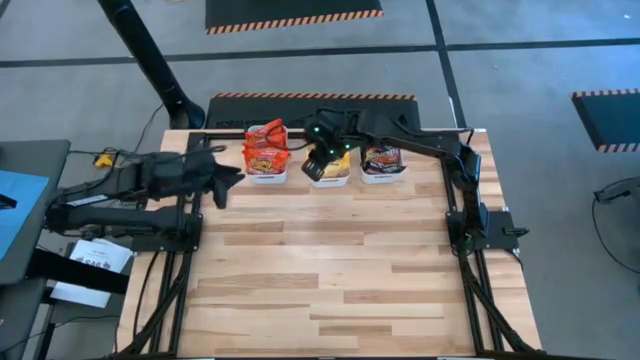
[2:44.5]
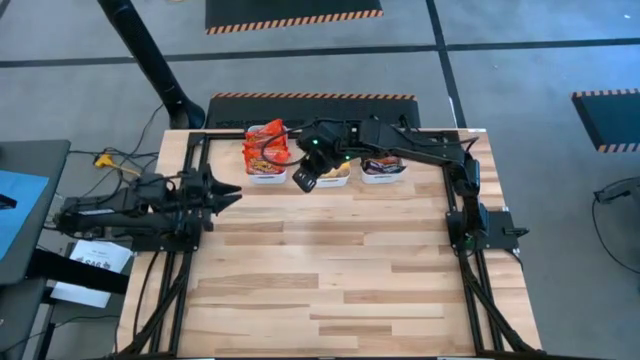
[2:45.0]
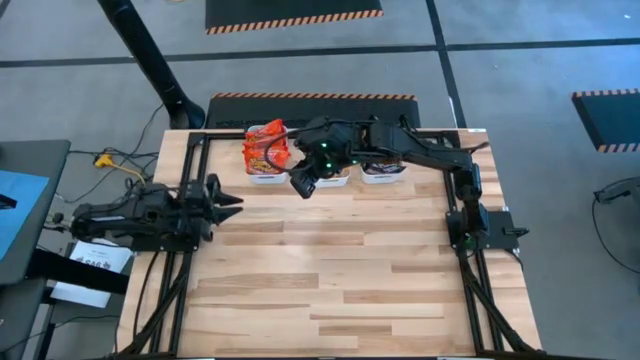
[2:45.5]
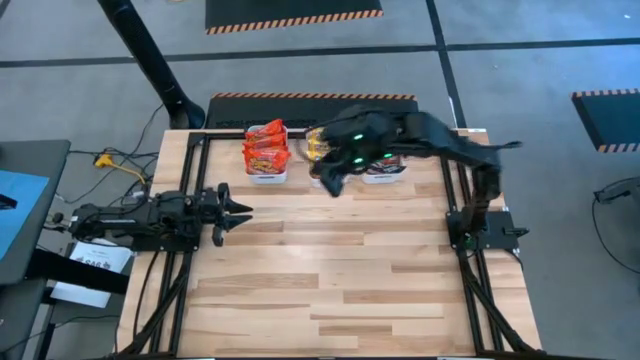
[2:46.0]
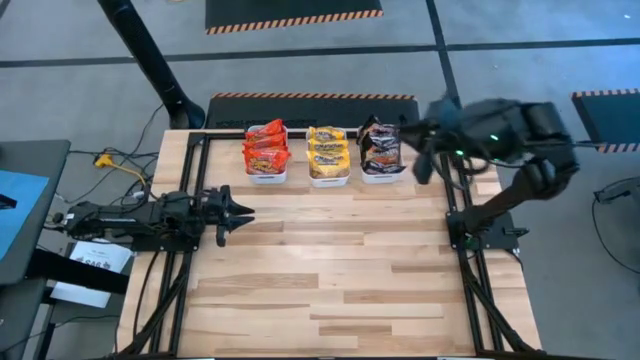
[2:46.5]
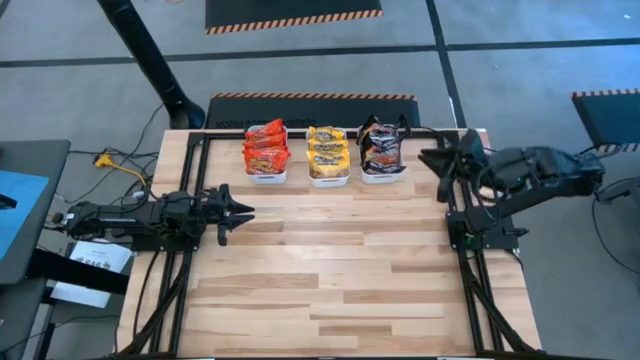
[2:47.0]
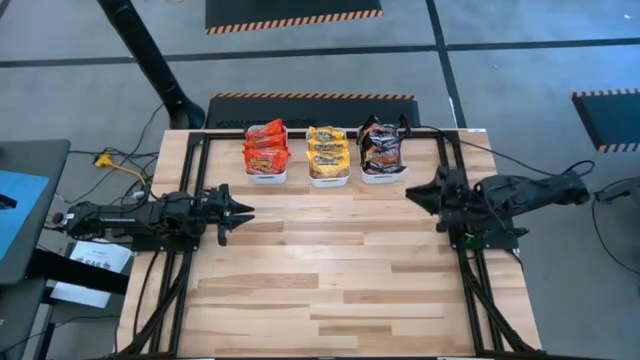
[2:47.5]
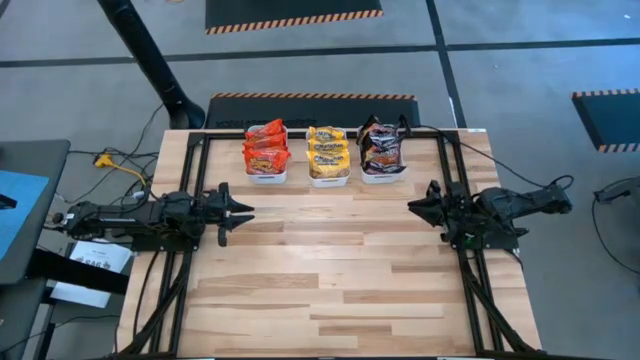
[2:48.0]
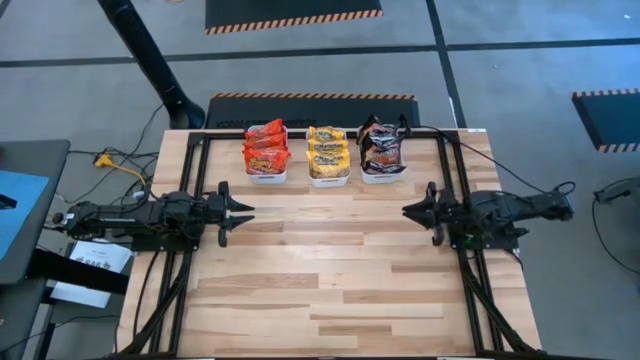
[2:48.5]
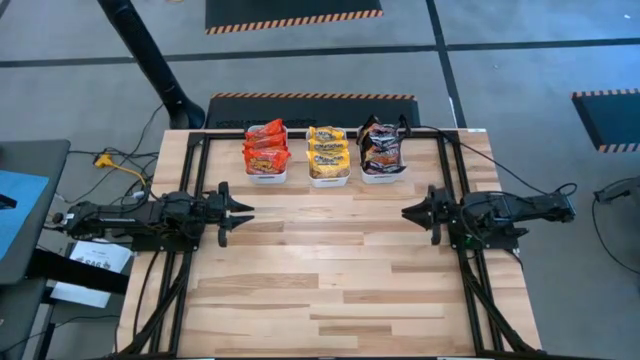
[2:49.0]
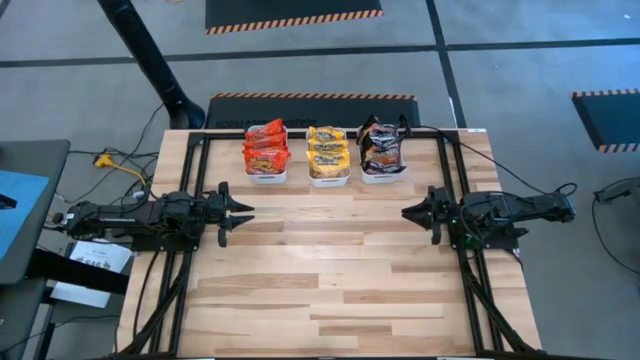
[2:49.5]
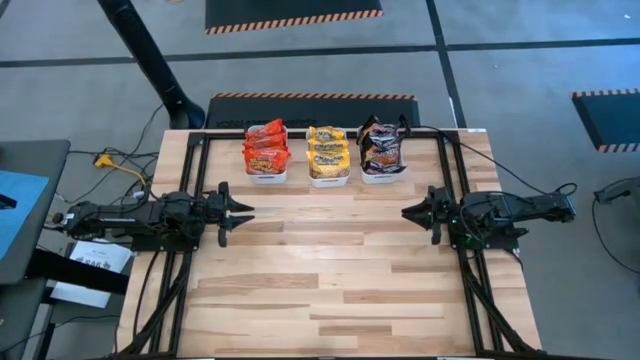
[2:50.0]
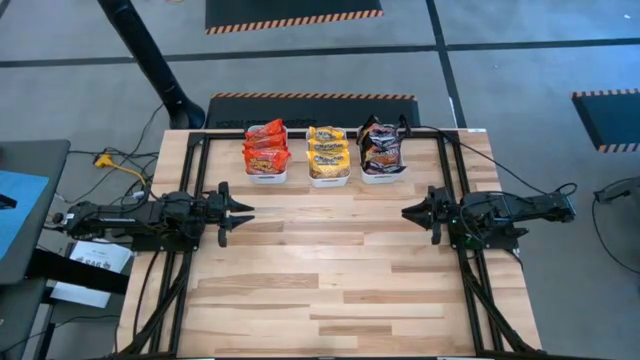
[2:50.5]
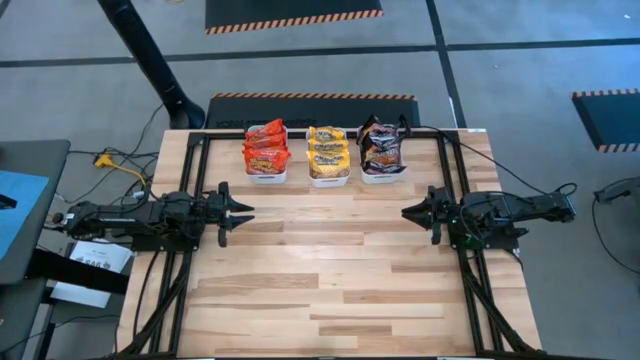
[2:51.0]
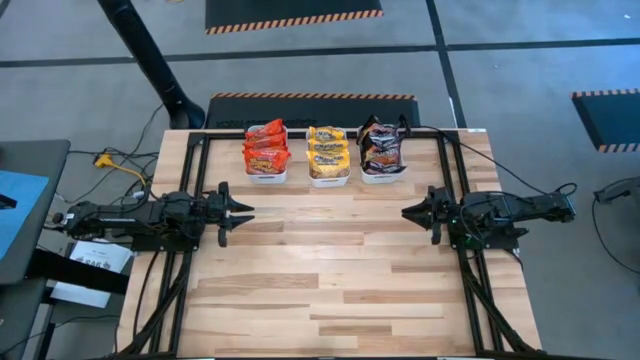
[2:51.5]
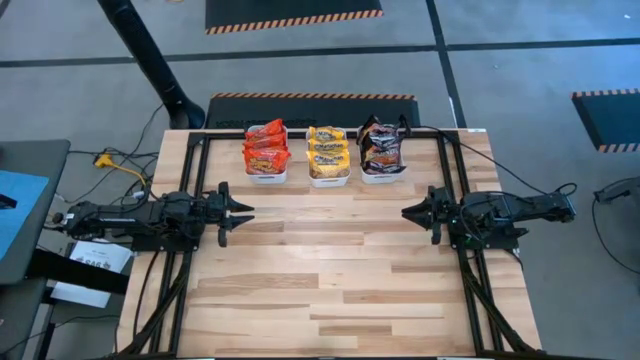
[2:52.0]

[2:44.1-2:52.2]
Task: Sort Maruchan noodles
Return to Home Position

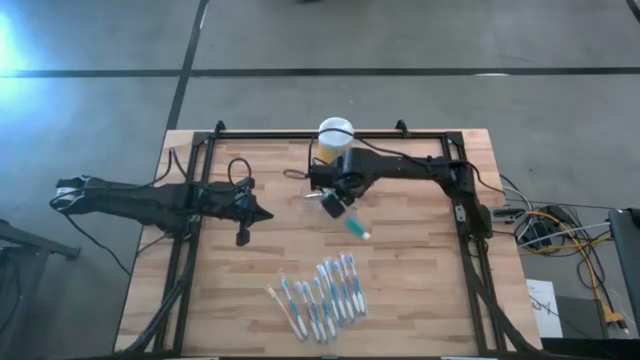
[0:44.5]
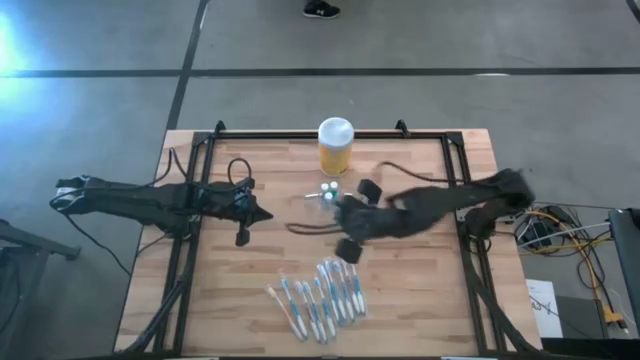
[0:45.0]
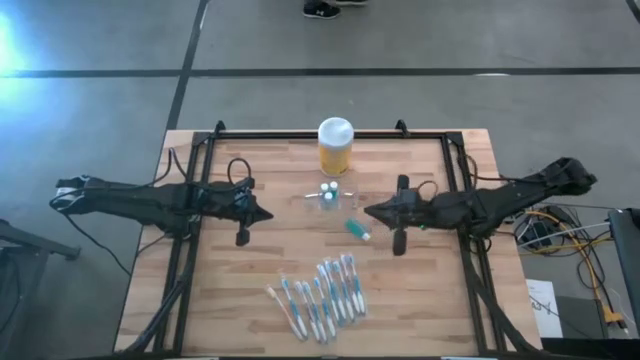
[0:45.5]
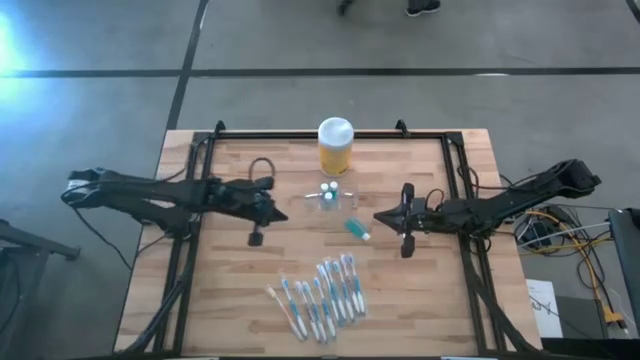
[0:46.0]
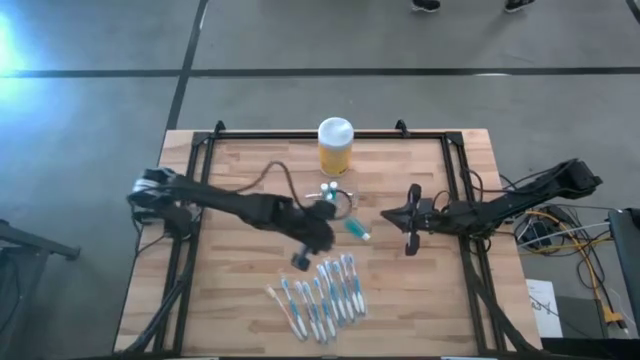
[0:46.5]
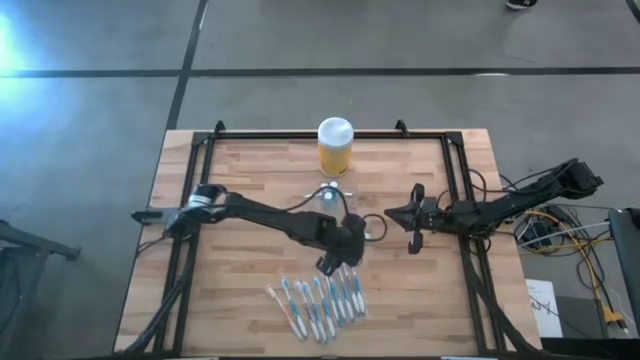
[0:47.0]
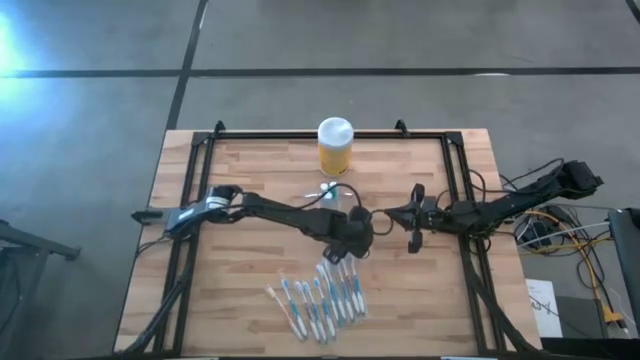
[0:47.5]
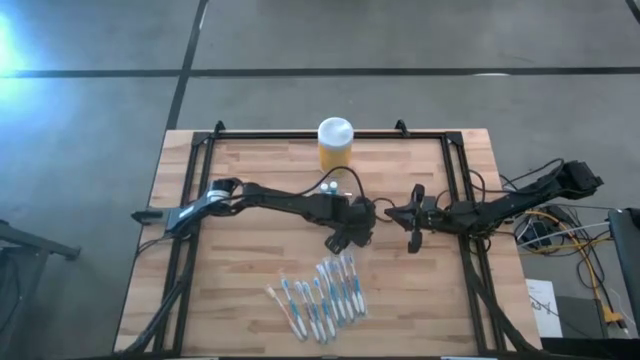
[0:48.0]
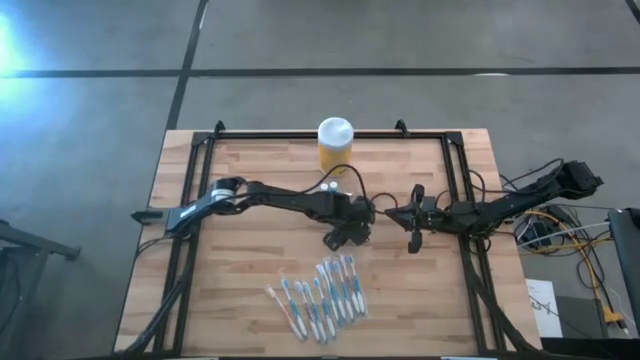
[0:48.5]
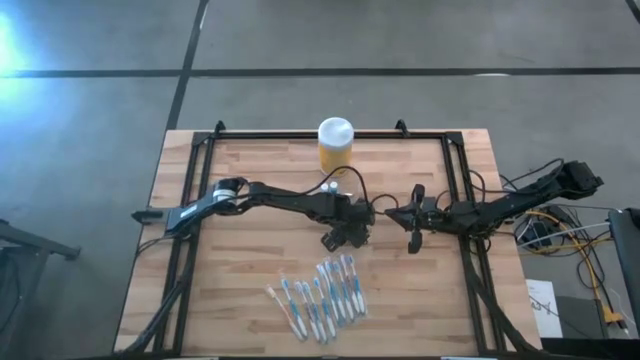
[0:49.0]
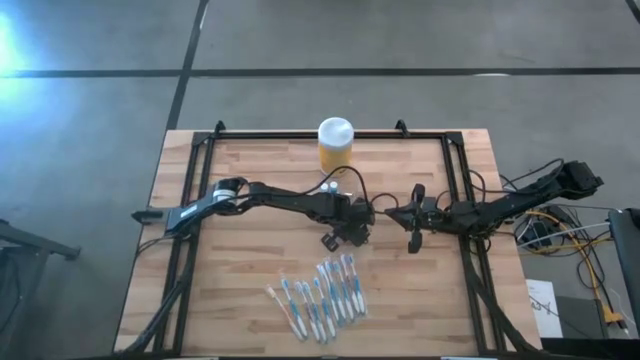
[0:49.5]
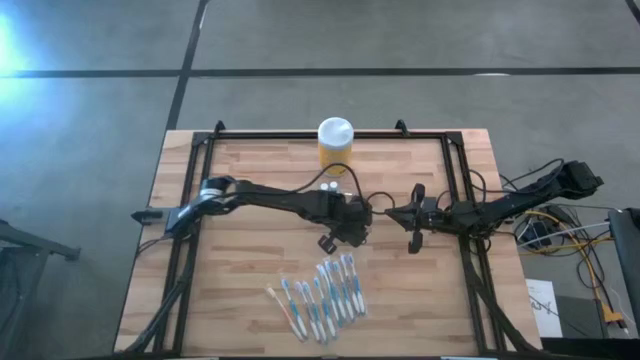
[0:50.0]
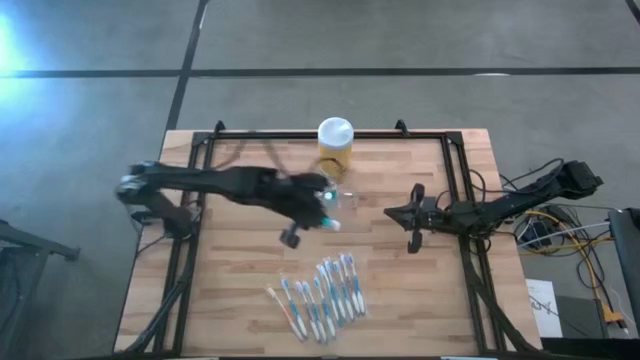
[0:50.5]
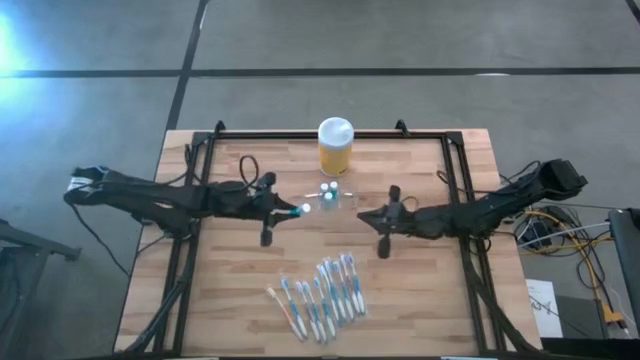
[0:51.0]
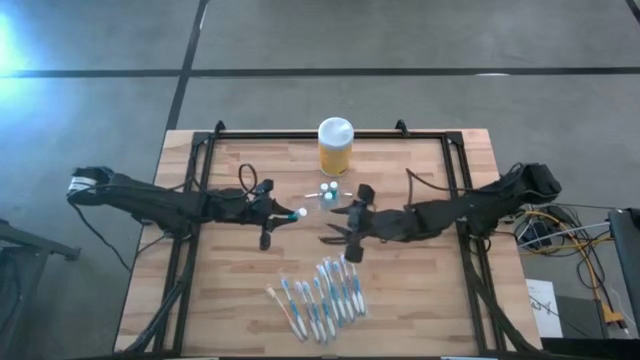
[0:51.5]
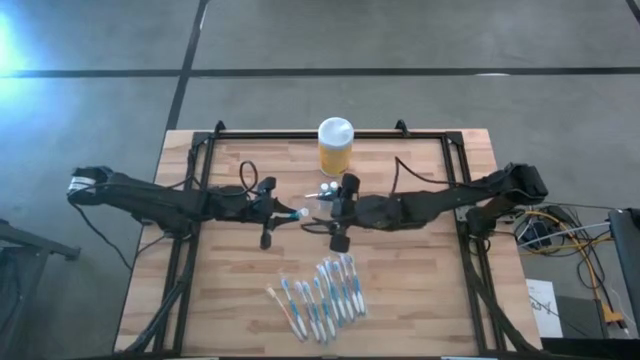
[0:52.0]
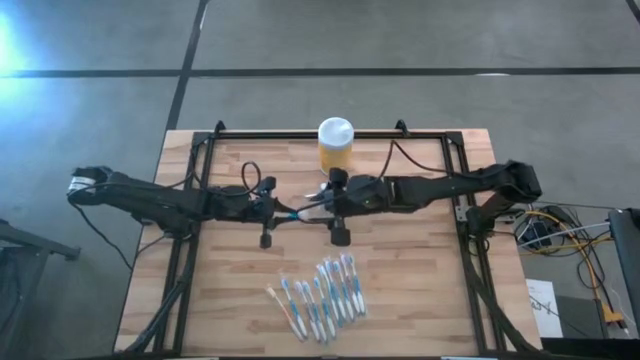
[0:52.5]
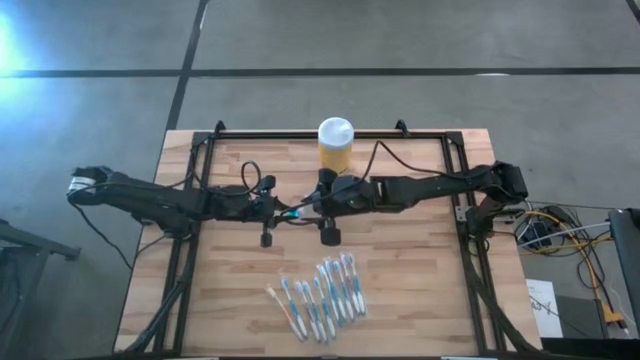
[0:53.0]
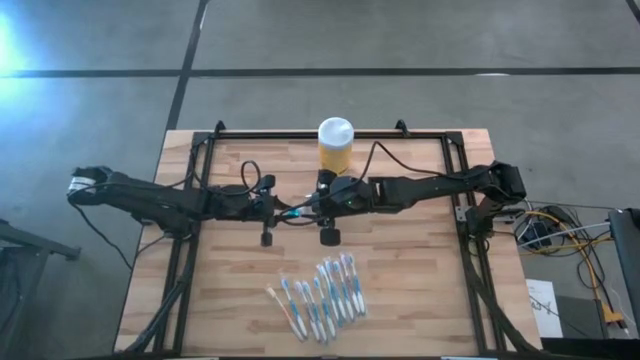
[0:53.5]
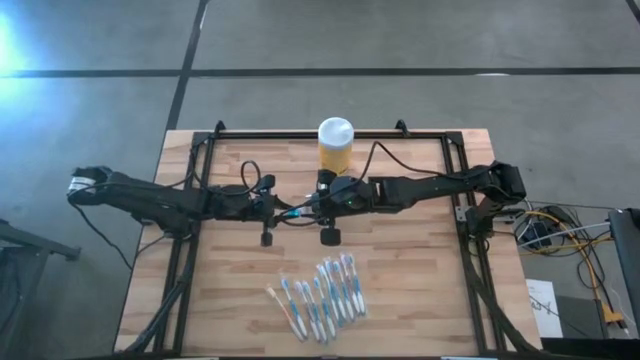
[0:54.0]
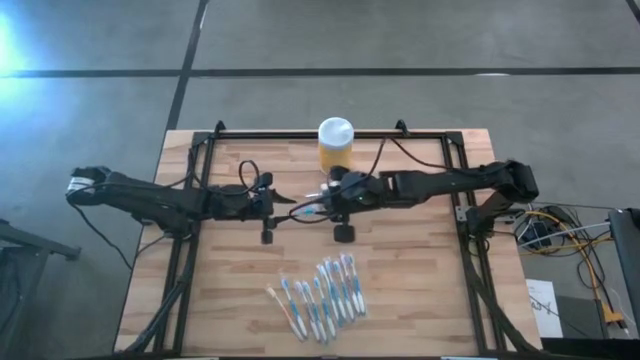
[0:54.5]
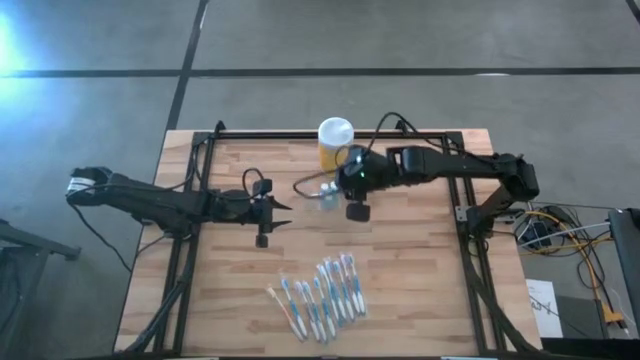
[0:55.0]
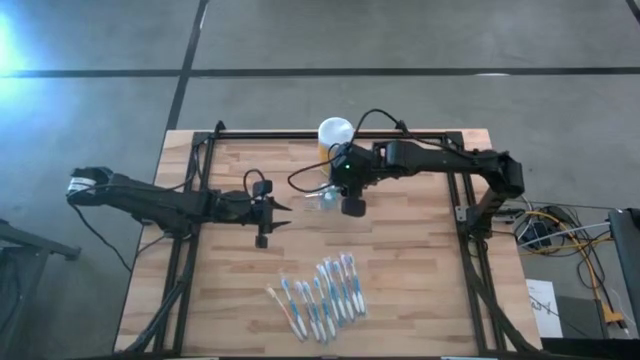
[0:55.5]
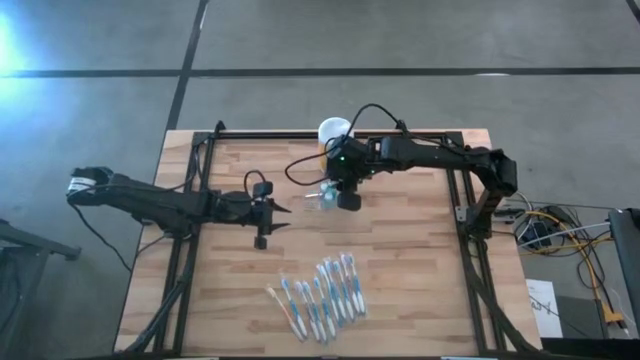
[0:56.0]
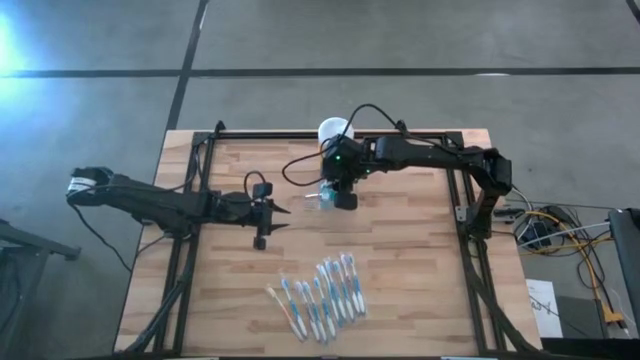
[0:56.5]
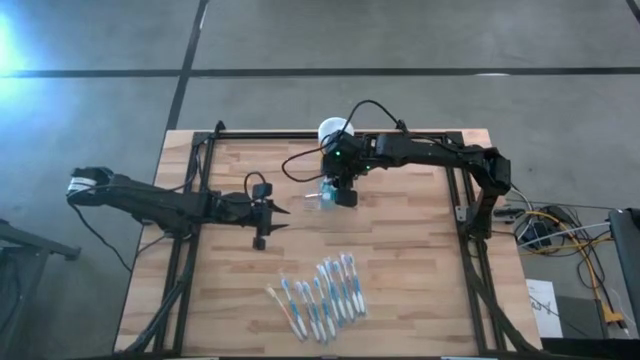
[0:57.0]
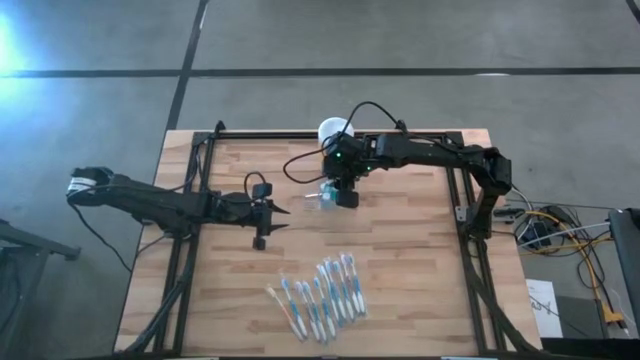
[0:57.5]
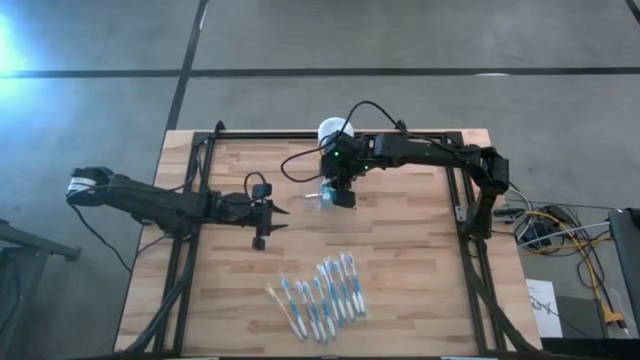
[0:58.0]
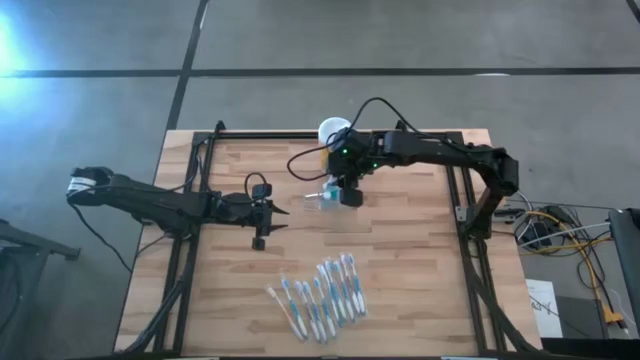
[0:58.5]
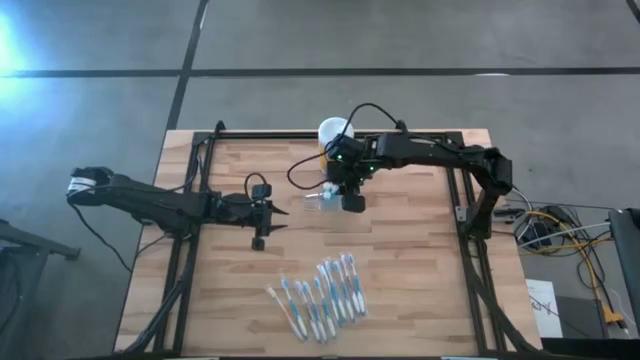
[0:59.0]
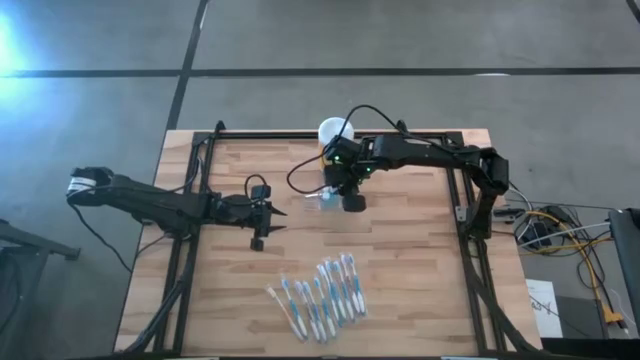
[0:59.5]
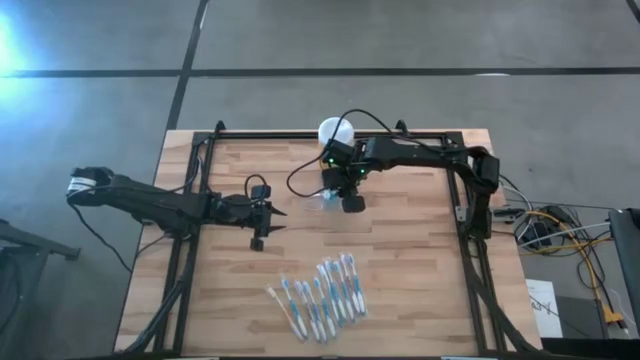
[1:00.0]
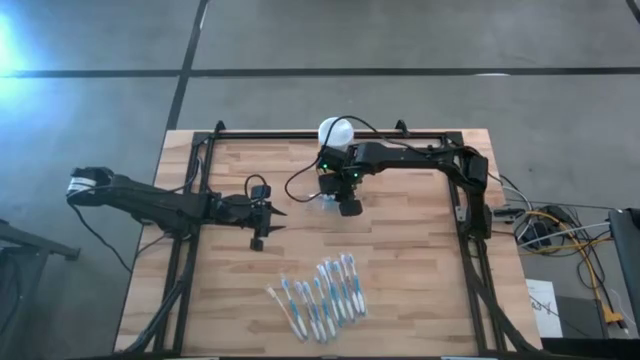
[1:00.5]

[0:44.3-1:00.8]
Task: Pick & Place toothbrushing station
Put the blue mouthwash bottle into the transparent organizer
